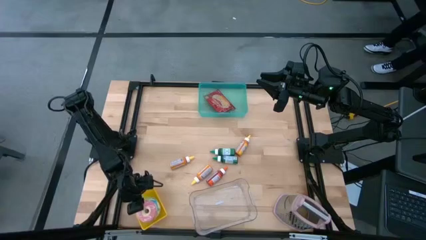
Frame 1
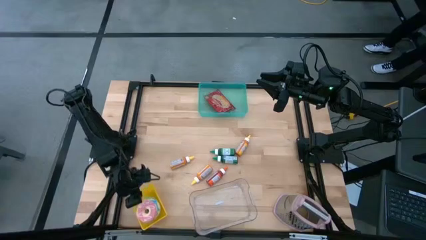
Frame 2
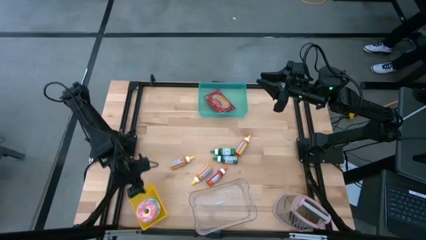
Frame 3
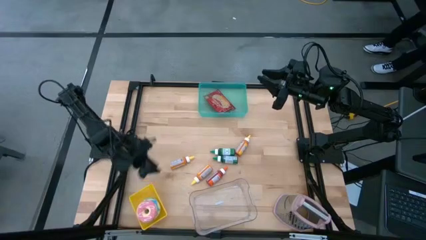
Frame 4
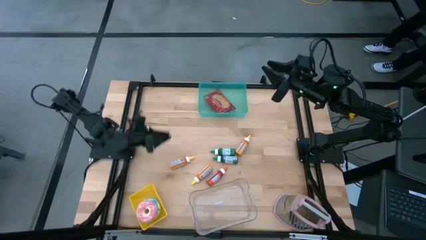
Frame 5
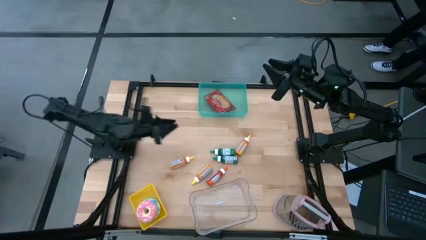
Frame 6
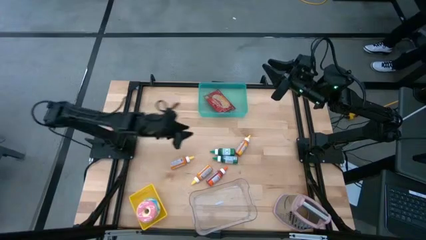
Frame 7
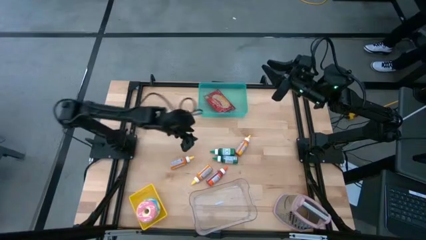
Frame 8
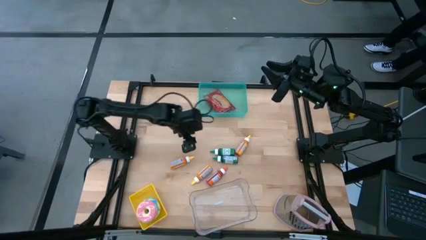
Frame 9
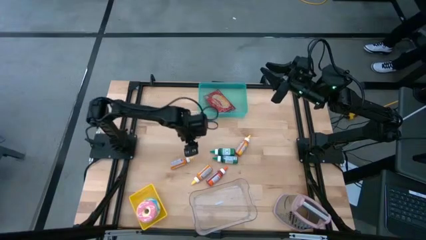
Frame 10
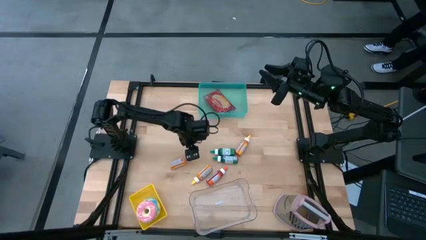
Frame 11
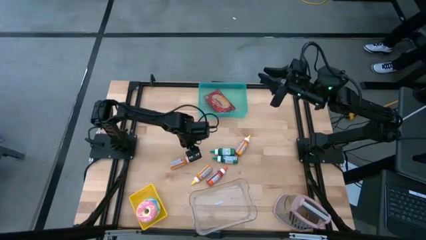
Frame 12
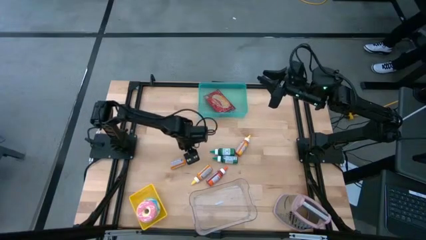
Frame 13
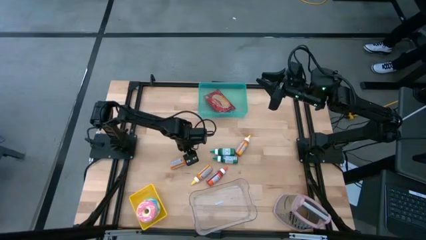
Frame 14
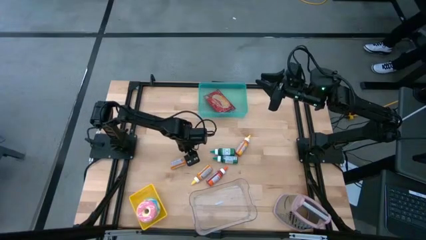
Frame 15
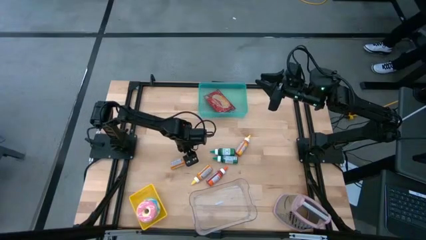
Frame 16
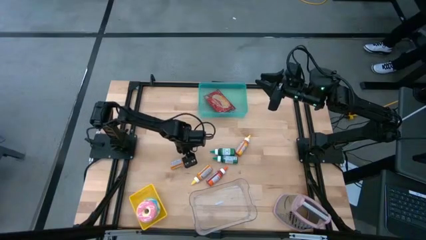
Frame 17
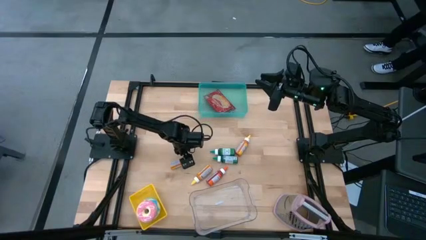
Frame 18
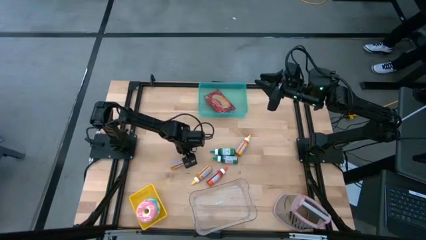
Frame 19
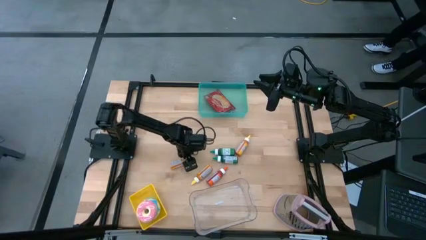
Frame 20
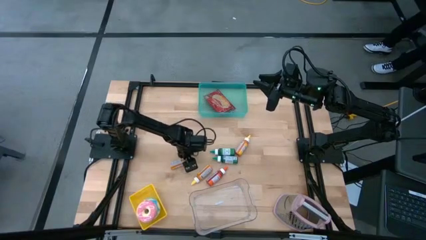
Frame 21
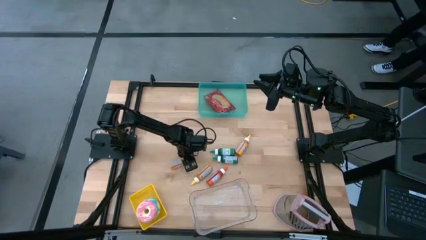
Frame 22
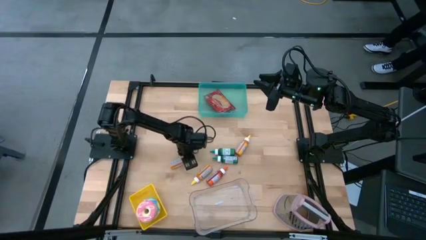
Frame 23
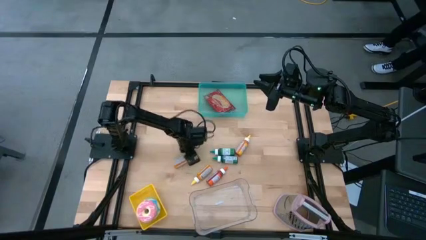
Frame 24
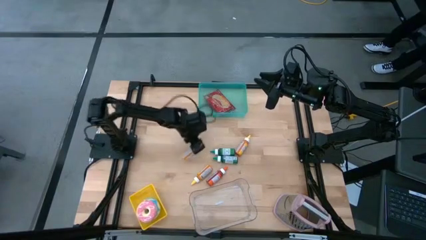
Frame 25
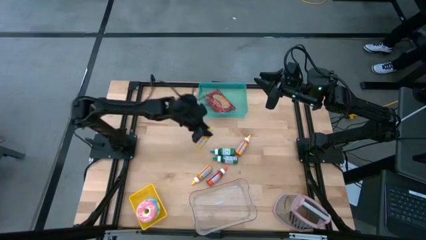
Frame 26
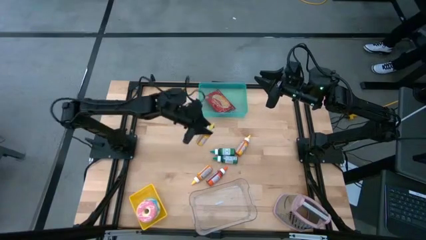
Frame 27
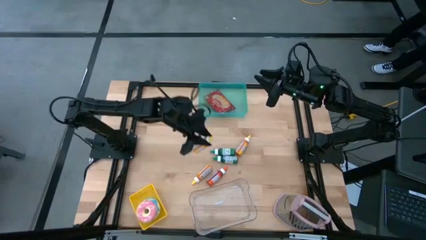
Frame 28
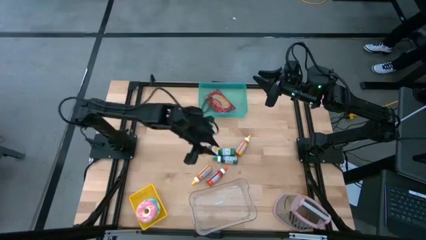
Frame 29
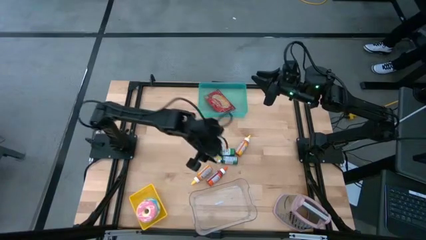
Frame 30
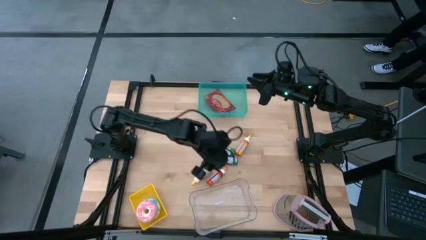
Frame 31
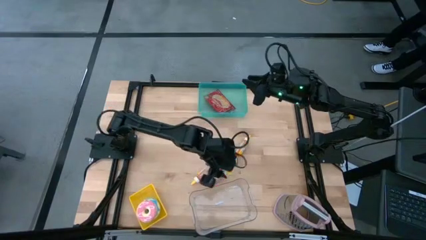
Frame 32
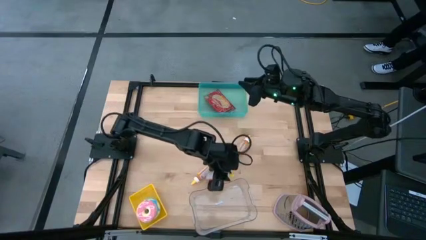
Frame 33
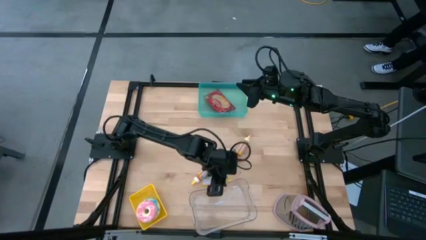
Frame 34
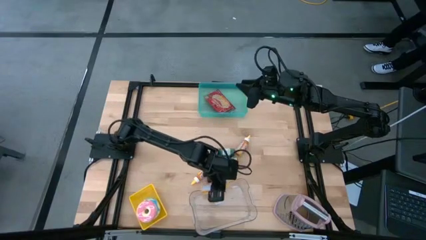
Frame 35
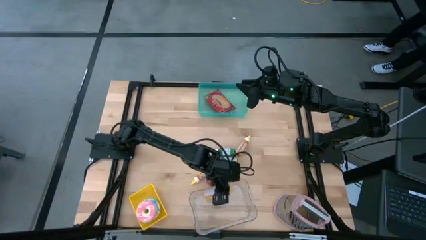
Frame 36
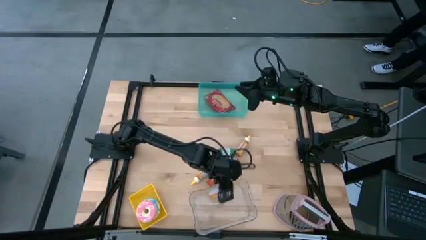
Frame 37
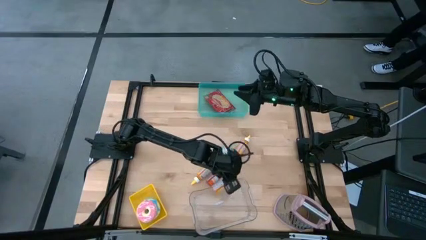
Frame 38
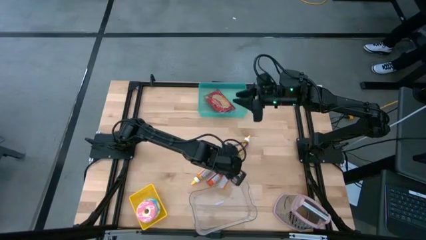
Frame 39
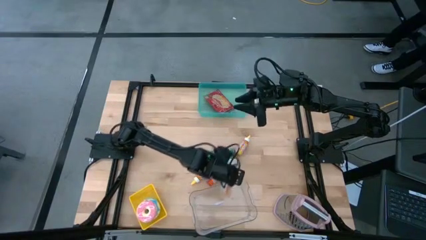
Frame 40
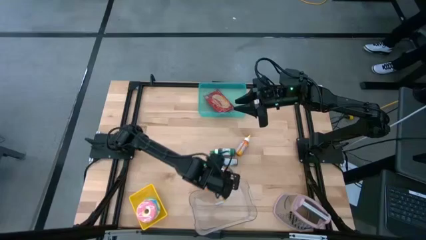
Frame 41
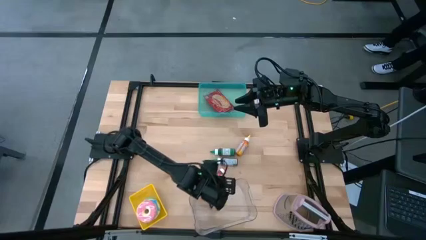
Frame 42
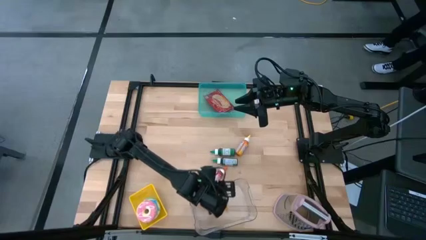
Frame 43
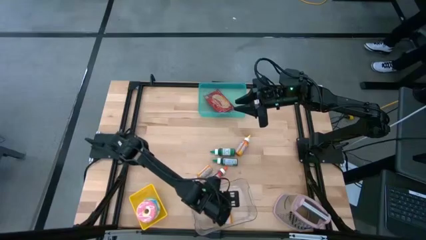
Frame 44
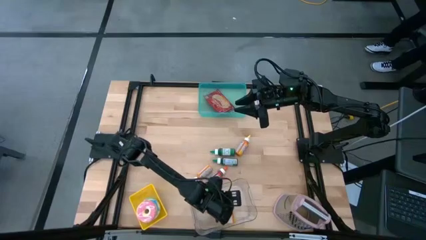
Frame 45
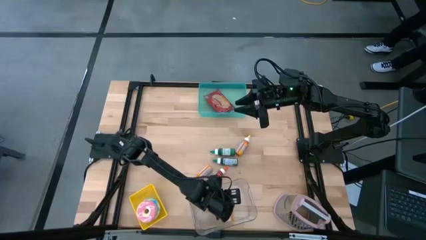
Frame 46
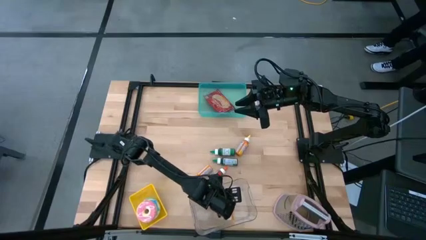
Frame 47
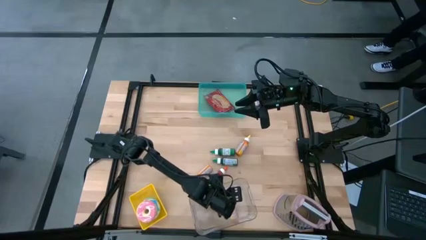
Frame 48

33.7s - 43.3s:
Put the bottom left yellow food coloring bottle into the transparent bin

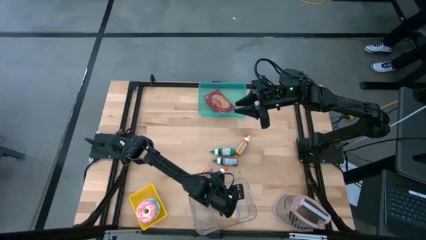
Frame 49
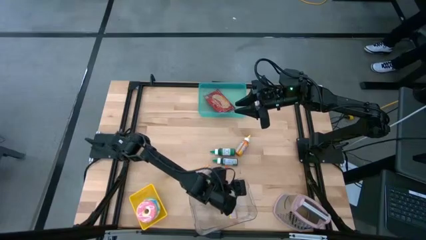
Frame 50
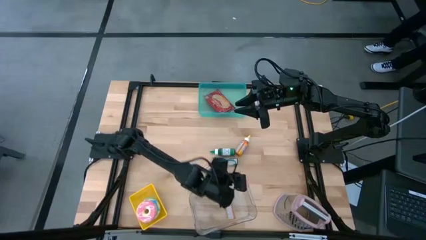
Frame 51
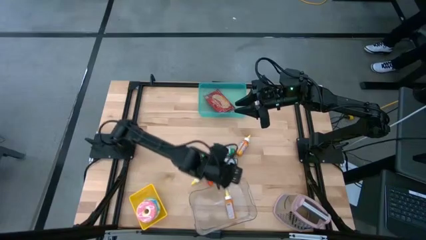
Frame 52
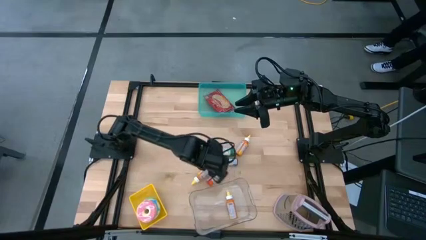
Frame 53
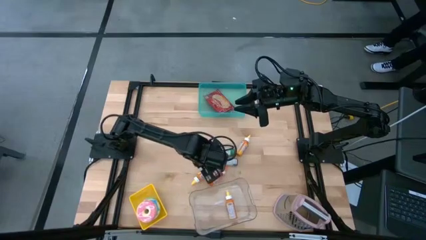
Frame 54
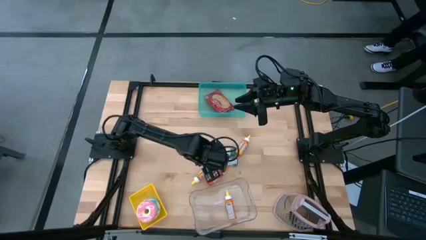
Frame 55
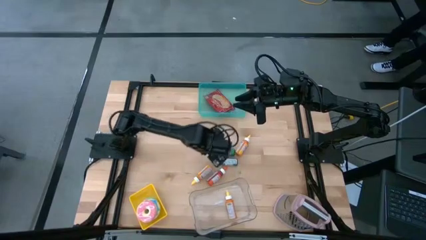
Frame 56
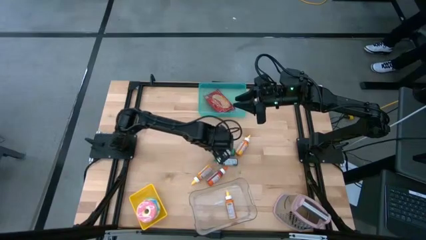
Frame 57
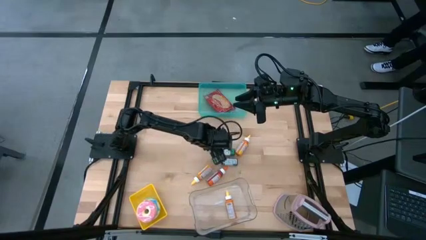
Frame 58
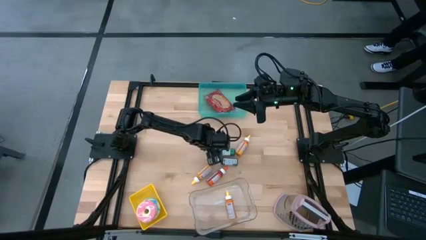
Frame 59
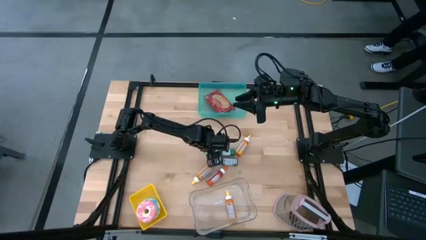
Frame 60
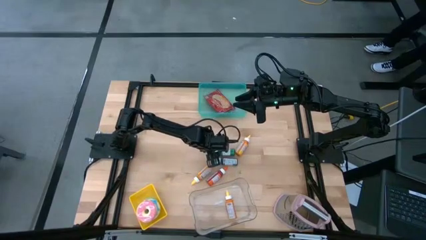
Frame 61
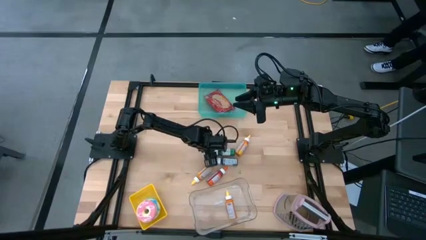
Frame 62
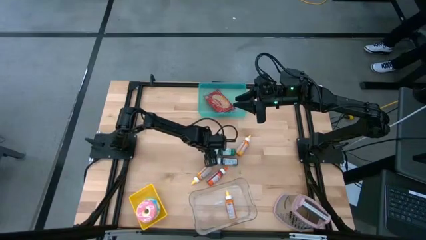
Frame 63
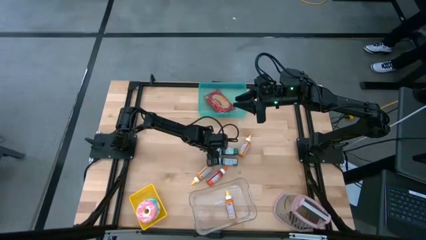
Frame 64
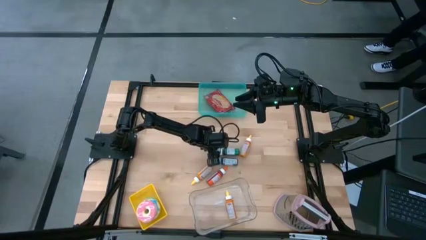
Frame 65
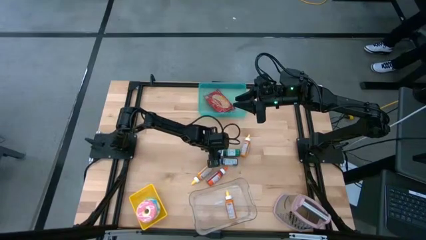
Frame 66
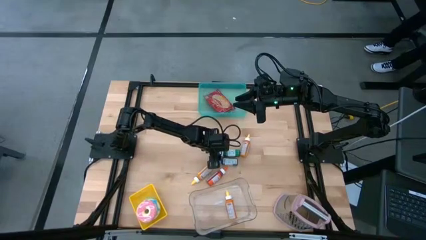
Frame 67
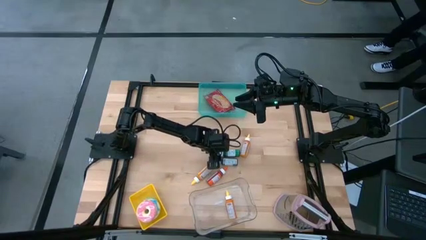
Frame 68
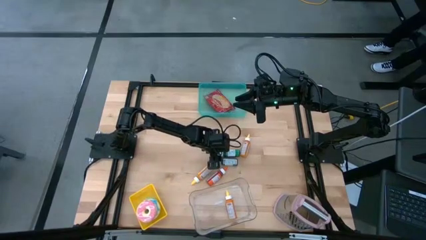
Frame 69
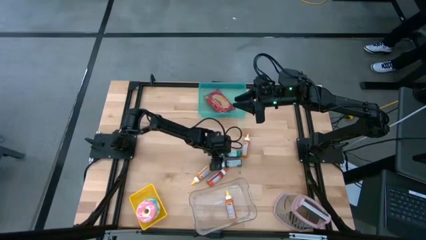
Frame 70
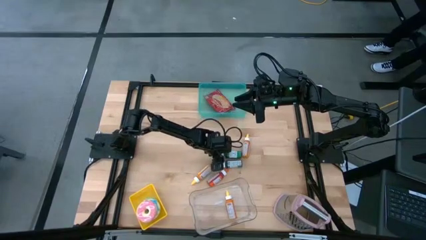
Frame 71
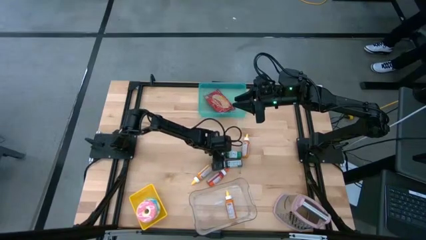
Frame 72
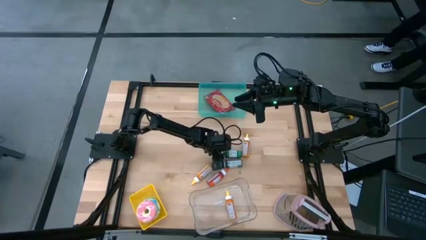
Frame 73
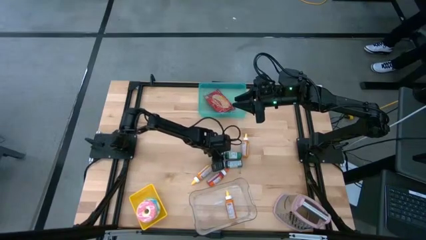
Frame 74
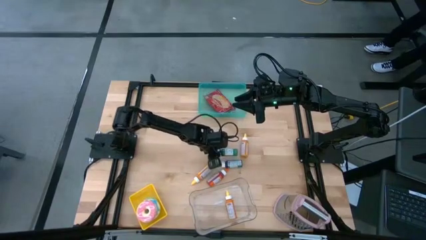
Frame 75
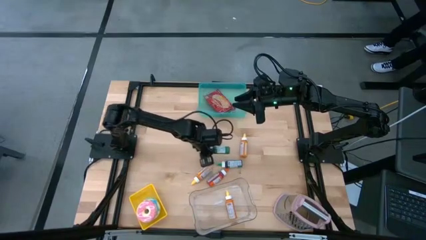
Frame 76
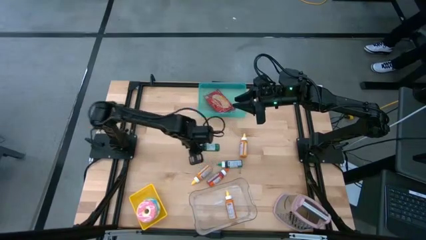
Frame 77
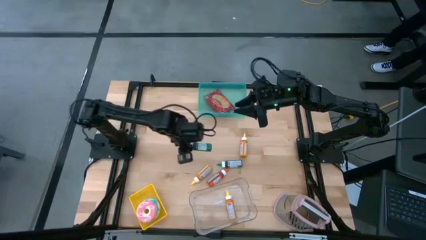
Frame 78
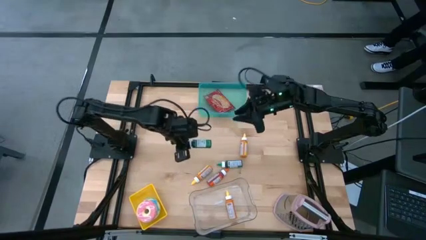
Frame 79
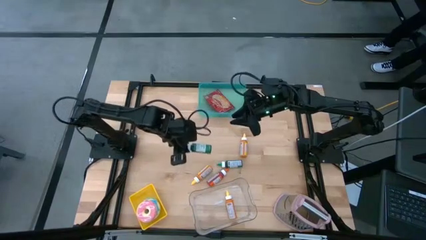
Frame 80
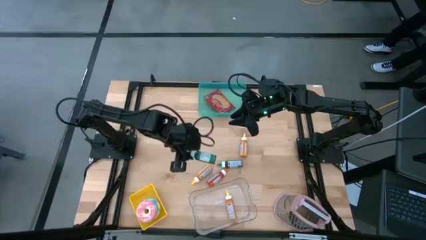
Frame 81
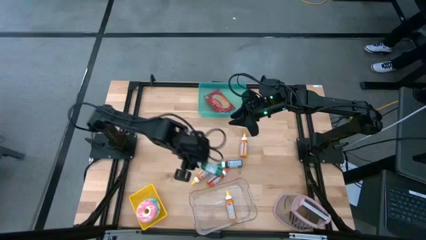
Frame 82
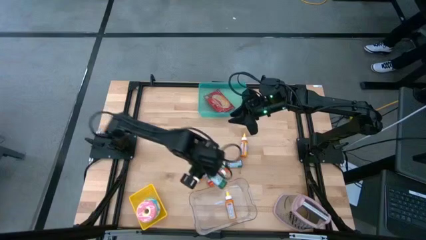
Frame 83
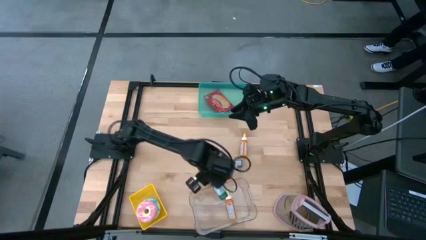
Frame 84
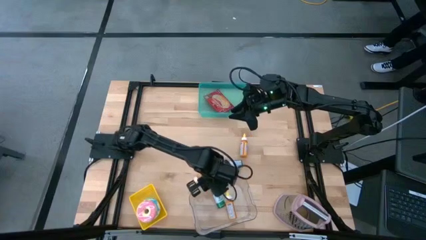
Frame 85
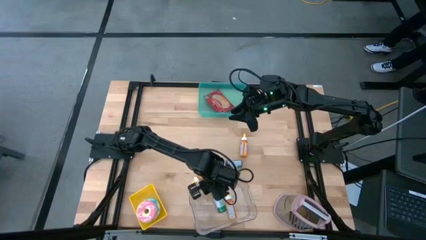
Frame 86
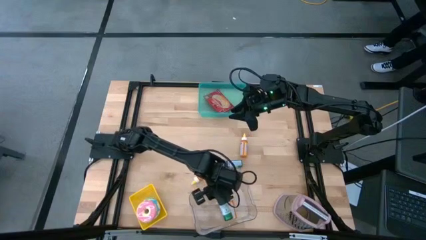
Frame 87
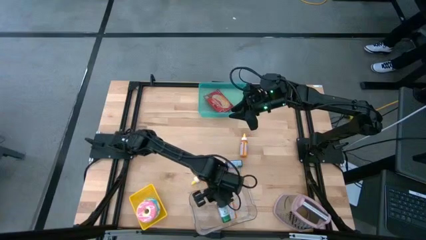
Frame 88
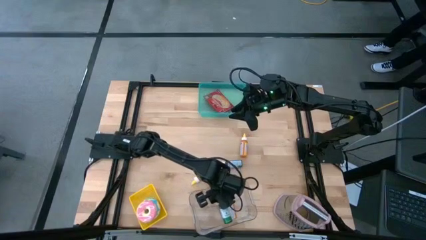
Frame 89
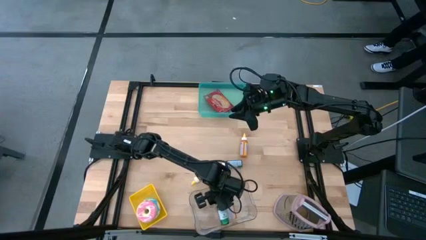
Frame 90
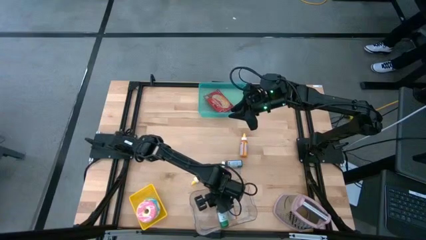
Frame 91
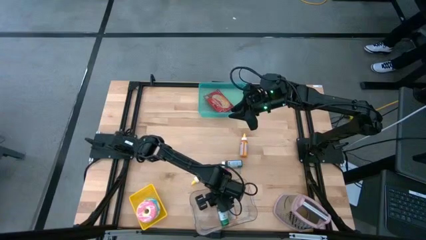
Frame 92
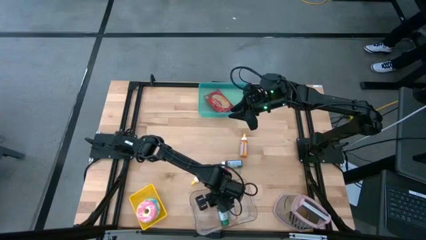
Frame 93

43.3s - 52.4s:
Put the top green food coloring bottle into the transparent bin
